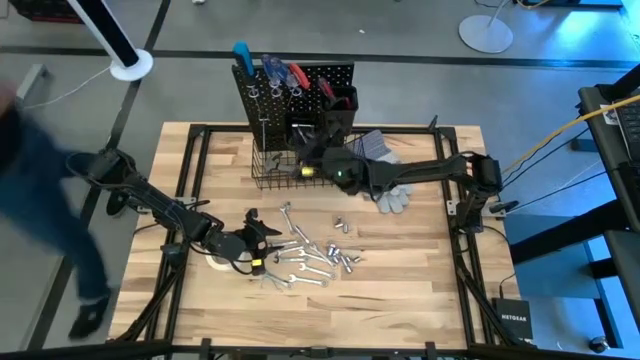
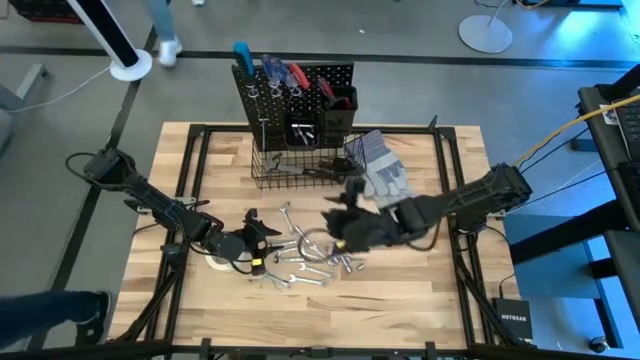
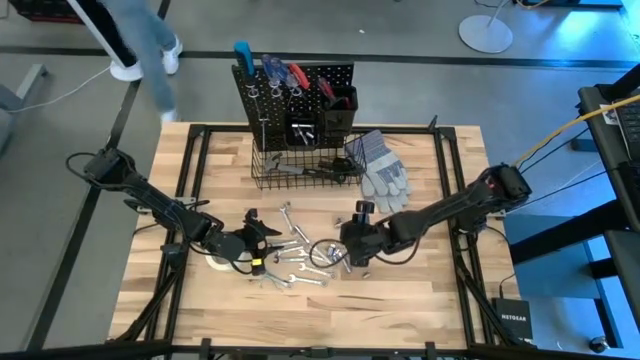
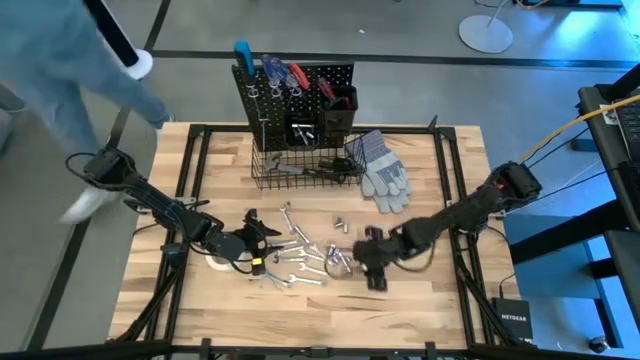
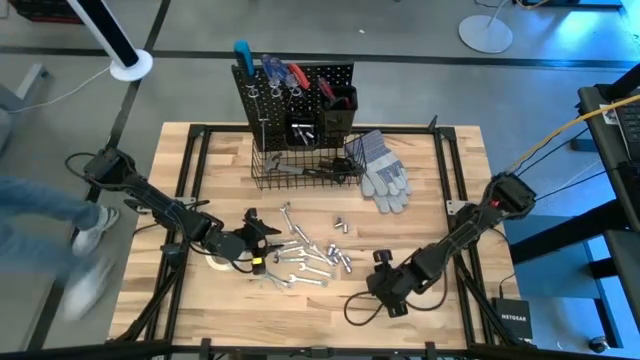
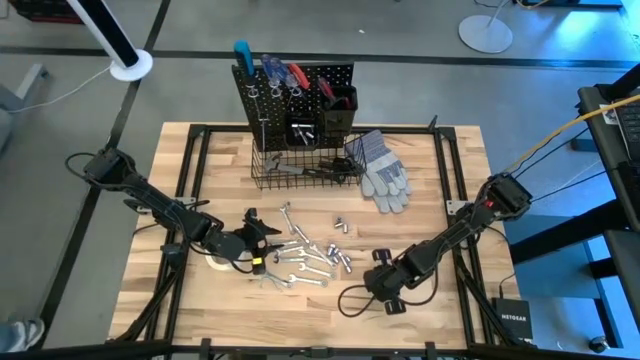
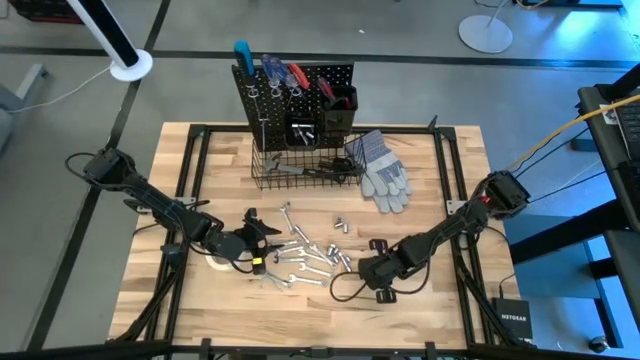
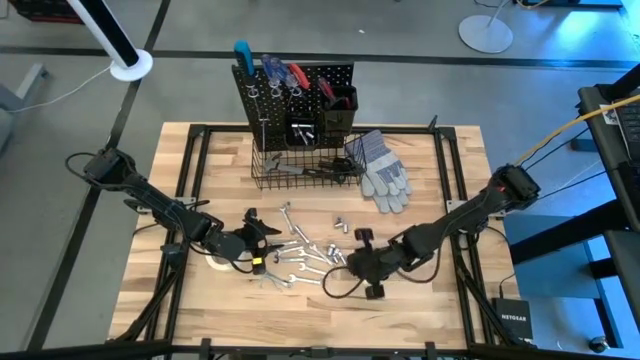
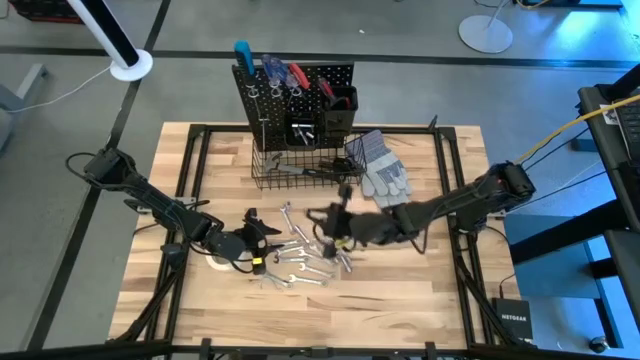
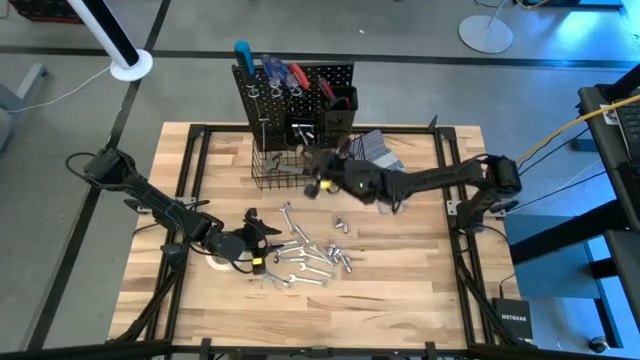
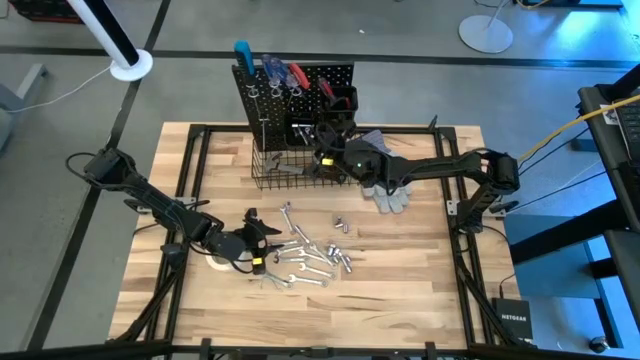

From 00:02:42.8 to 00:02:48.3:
Task: Hang tools onto peg board
Put the socket into the left black bin on the peg board

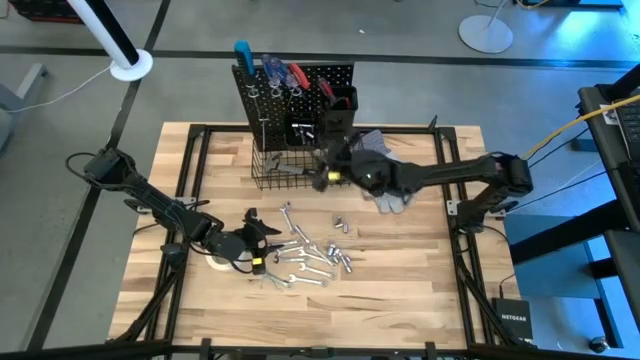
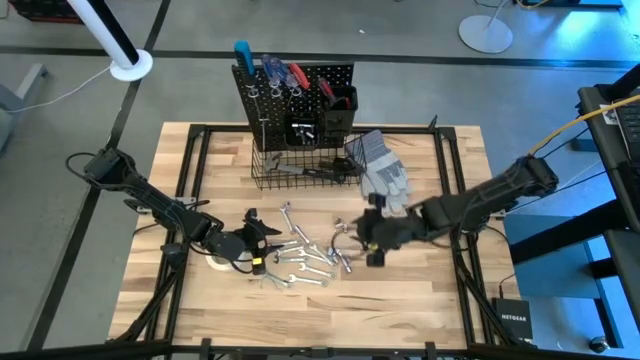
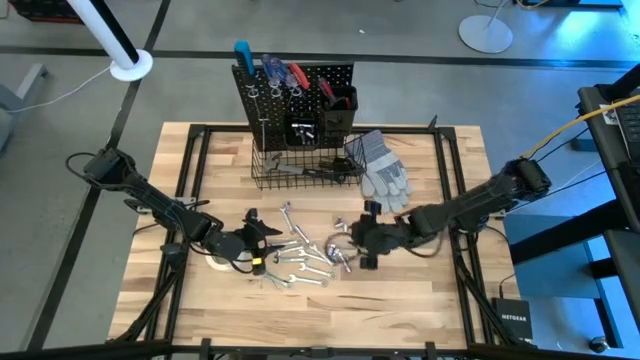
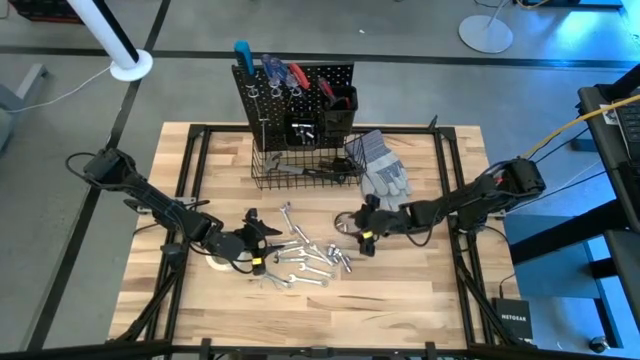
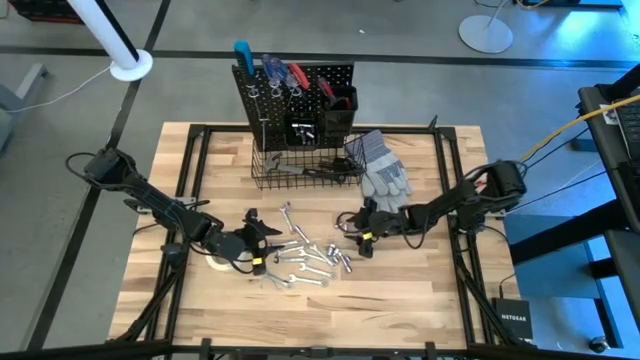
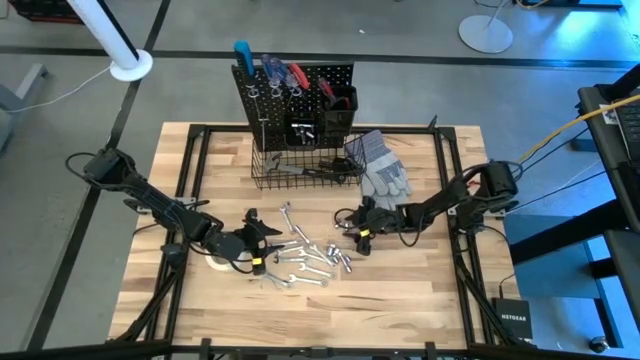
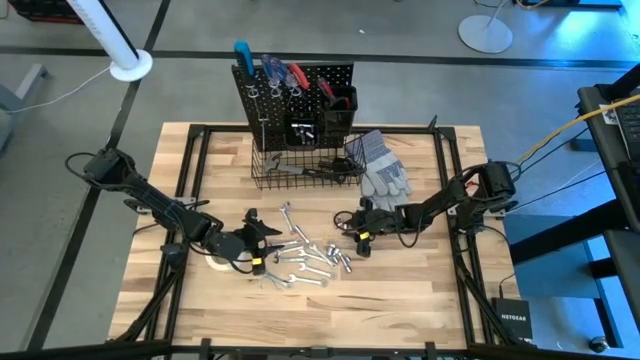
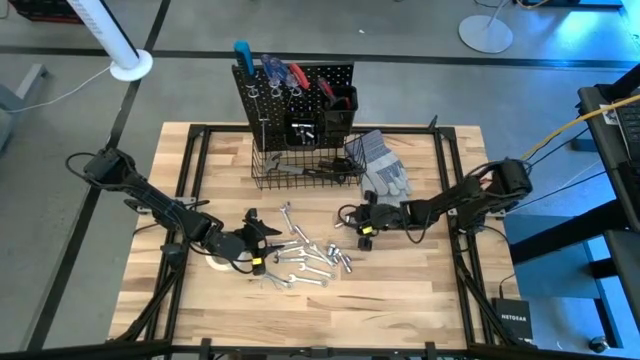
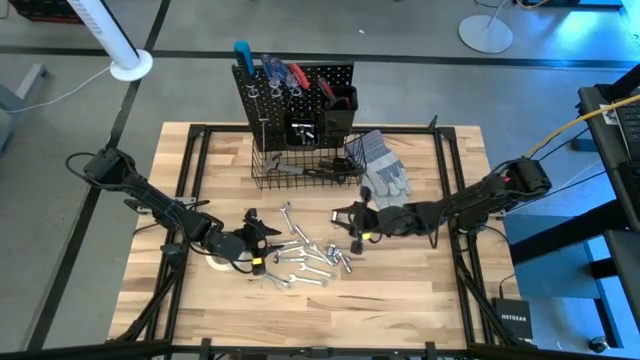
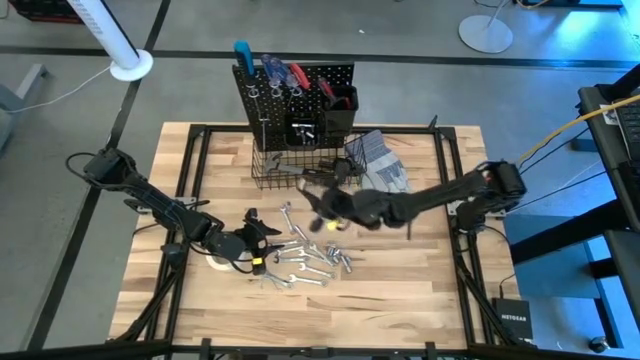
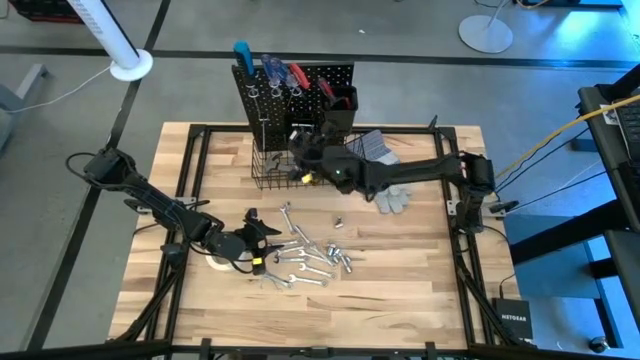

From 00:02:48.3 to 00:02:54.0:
Put the socket into the left black bin on the peg board

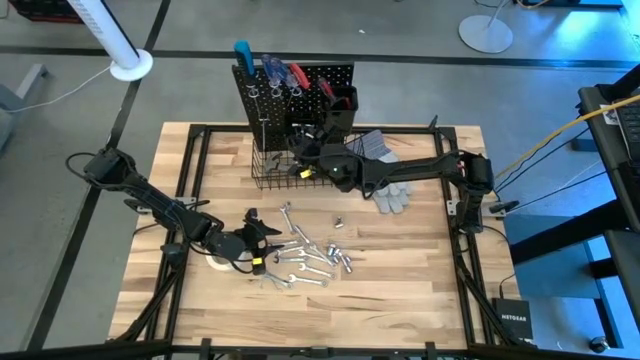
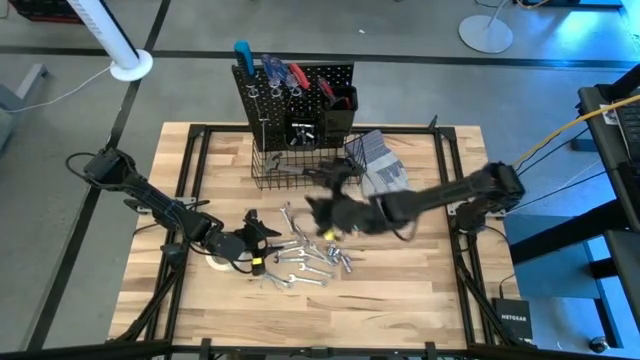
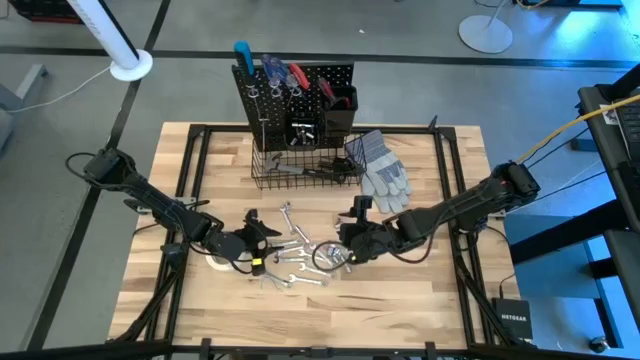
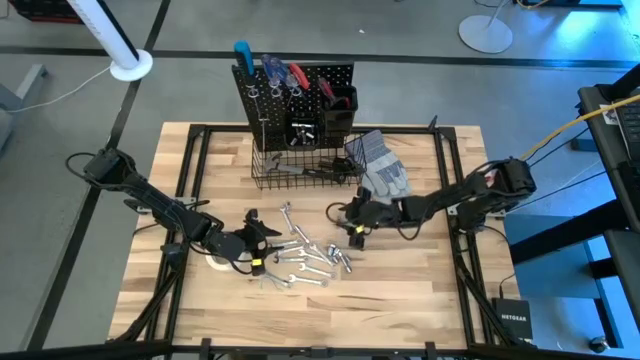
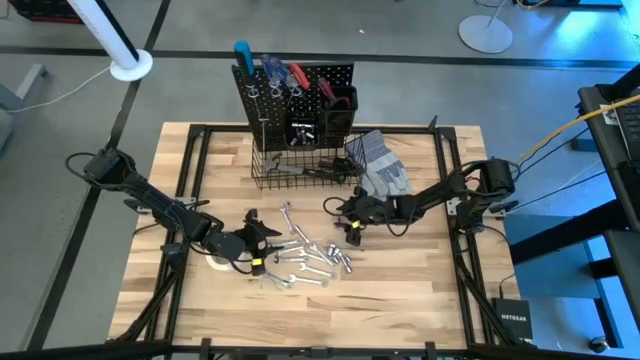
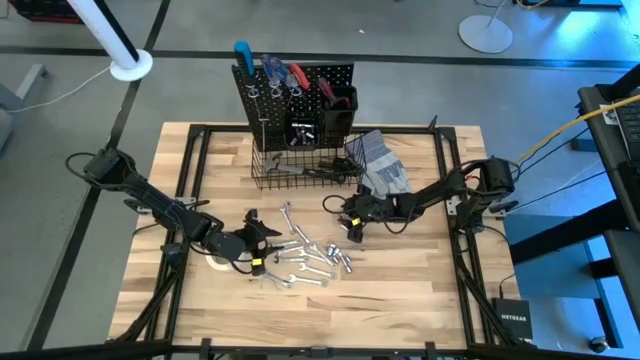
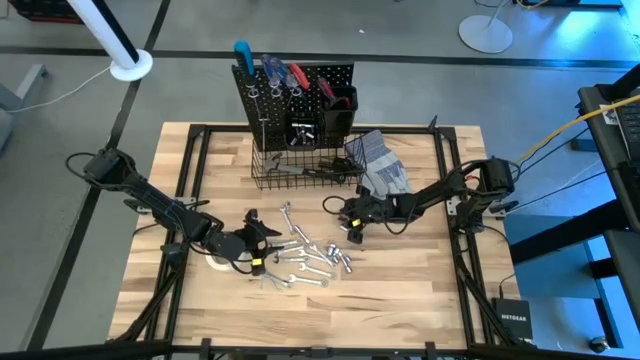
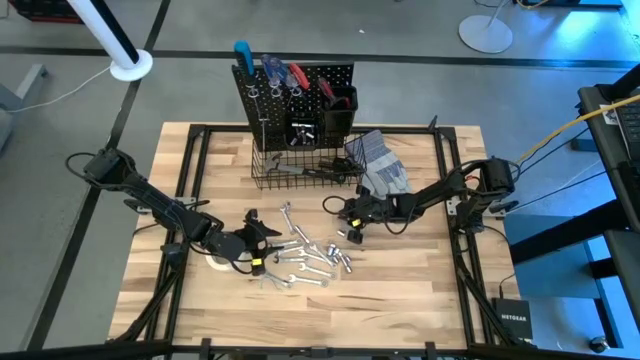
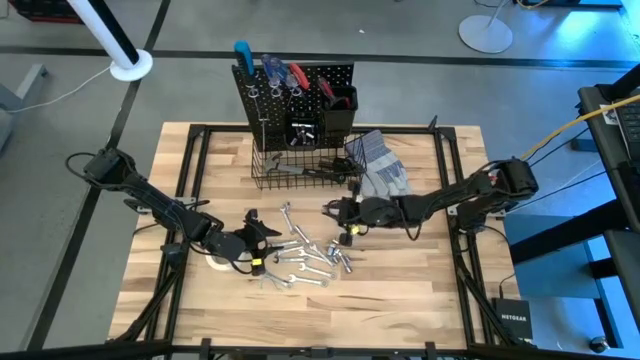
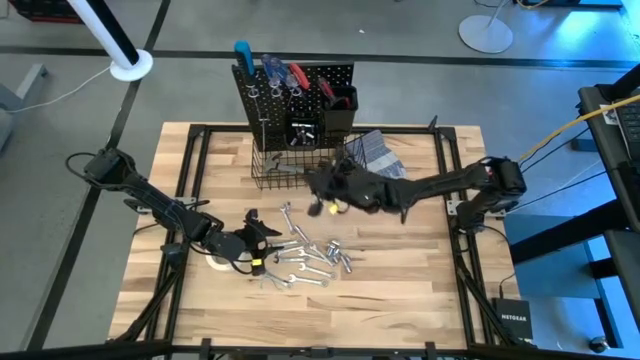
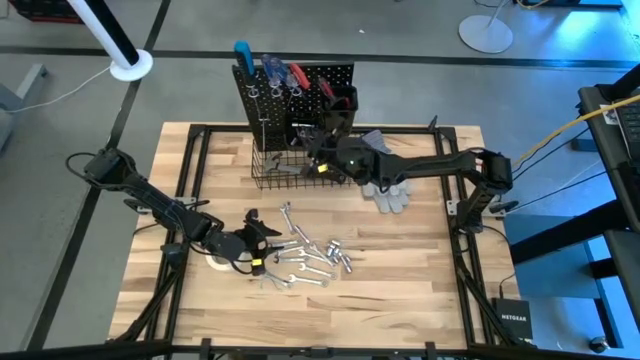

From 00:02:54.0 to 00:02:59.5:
Put the socket wrench into the left black bin on the peg board

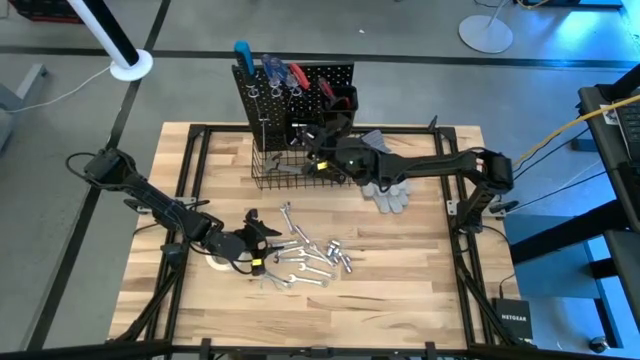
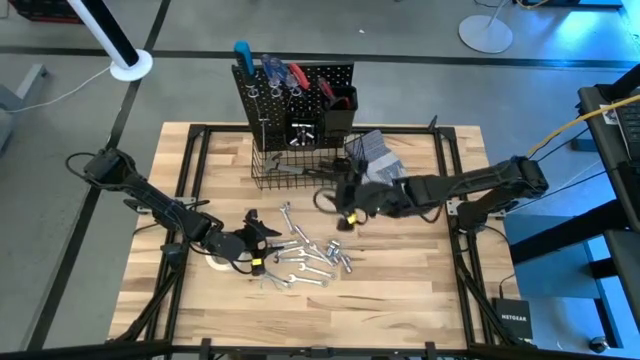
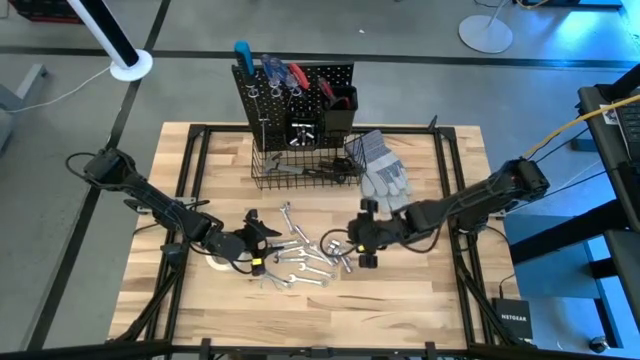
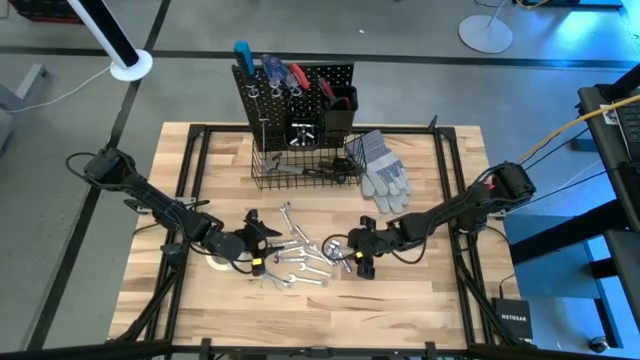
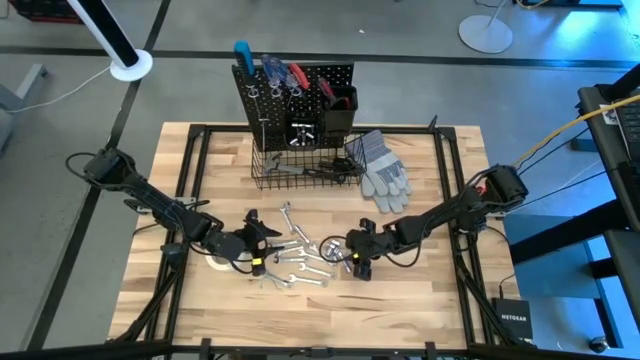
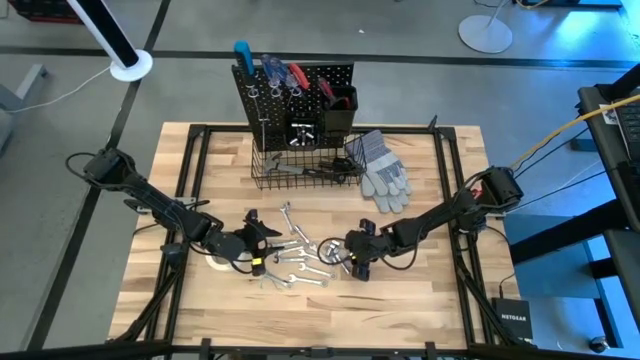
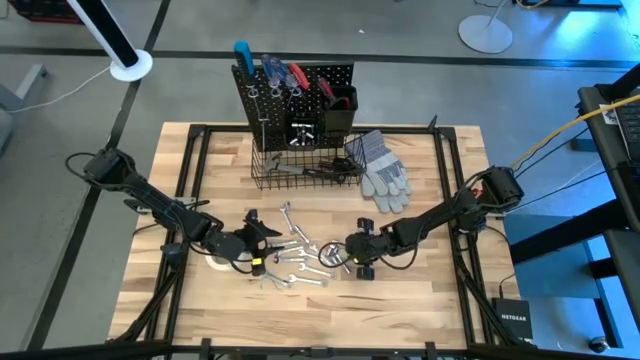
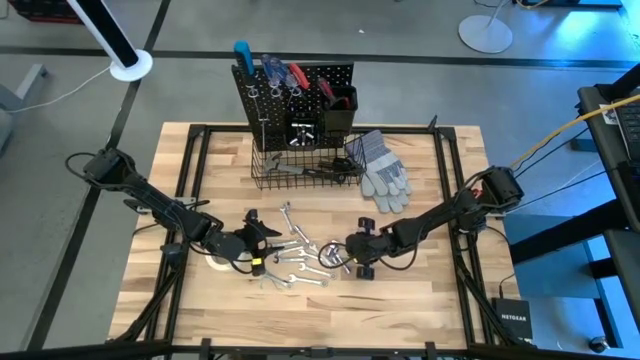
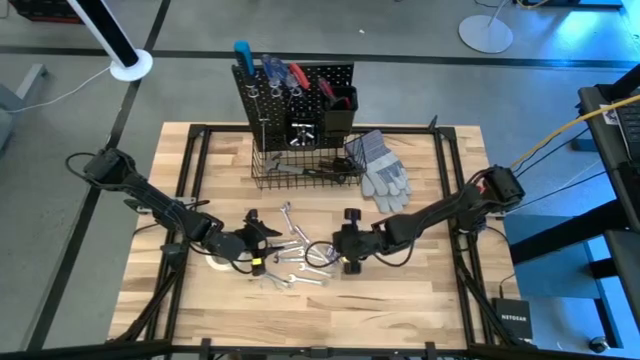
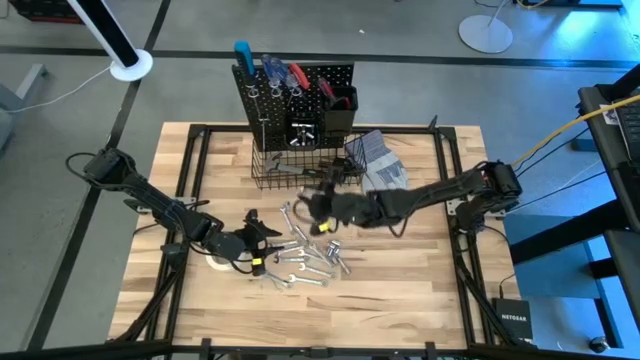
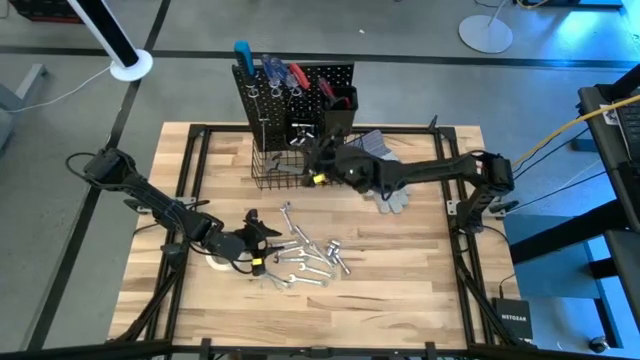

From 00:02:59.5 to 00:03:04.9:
Put the socket adapter into the left black bin on the peg board
